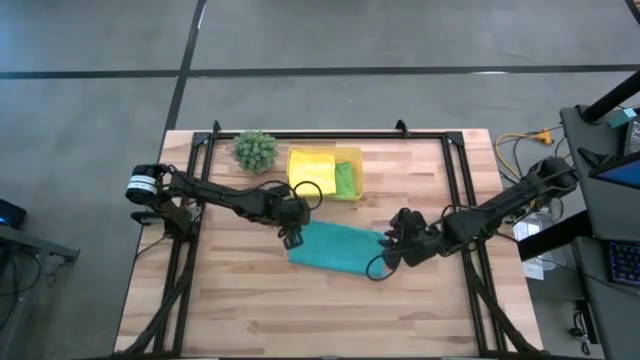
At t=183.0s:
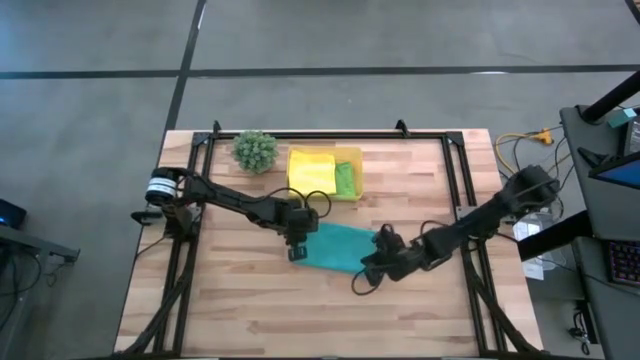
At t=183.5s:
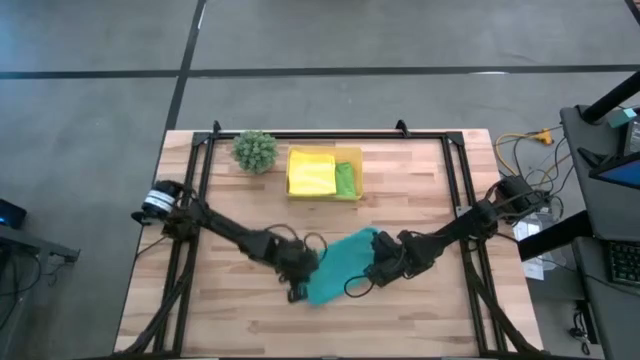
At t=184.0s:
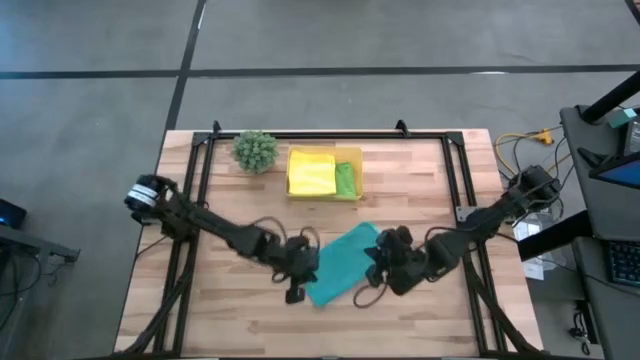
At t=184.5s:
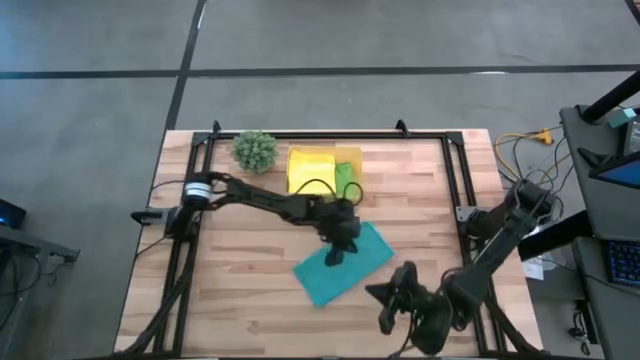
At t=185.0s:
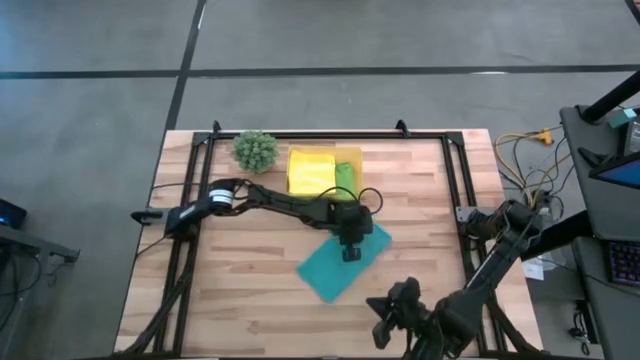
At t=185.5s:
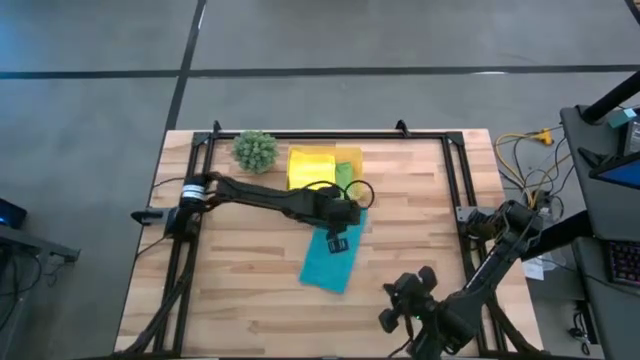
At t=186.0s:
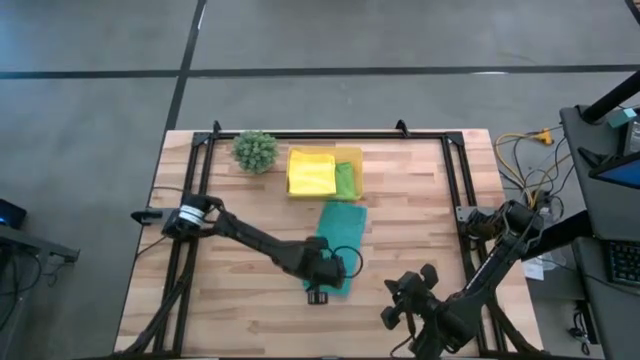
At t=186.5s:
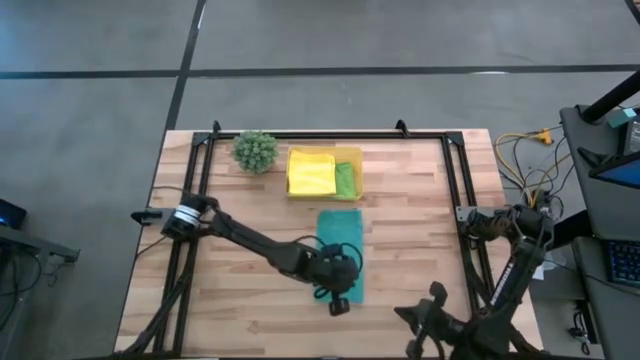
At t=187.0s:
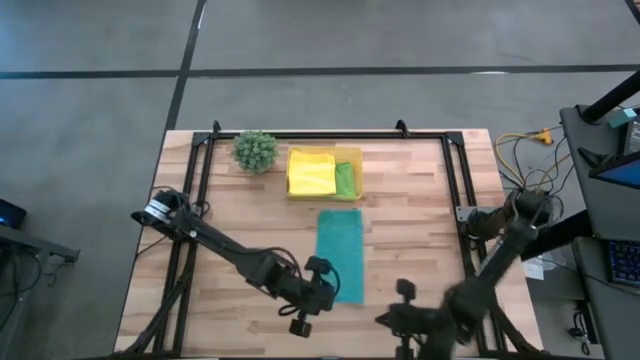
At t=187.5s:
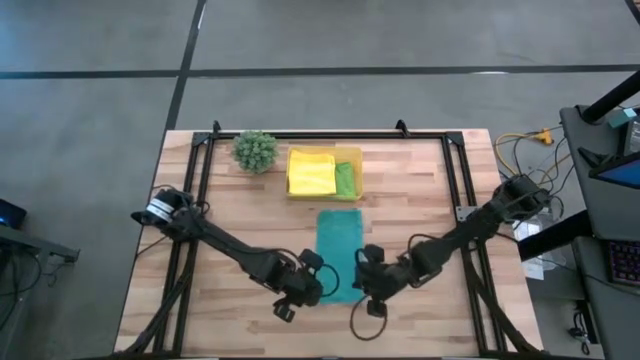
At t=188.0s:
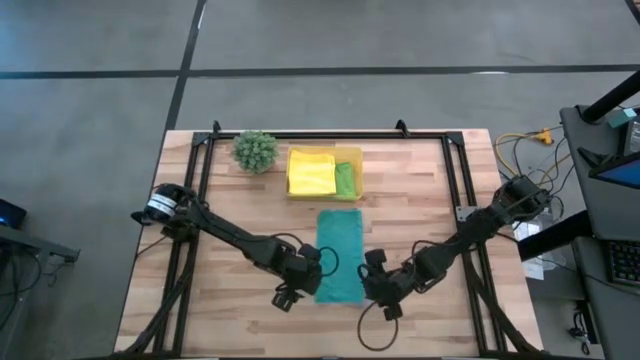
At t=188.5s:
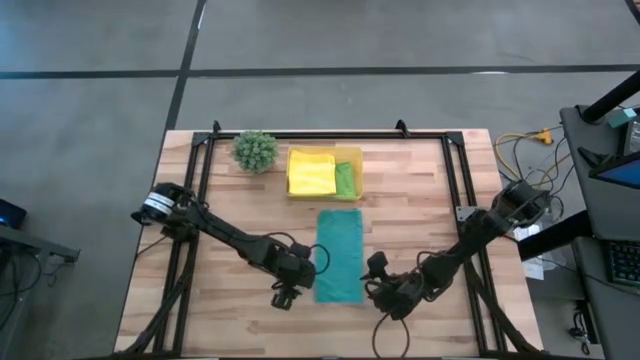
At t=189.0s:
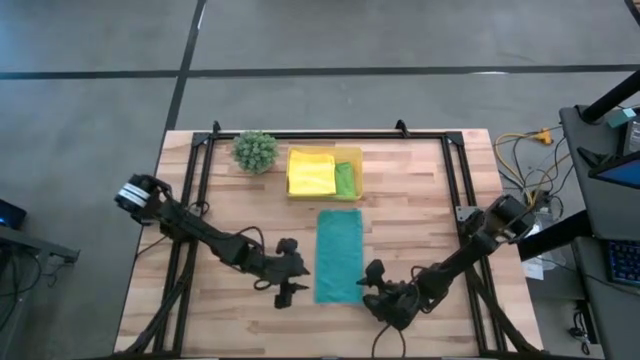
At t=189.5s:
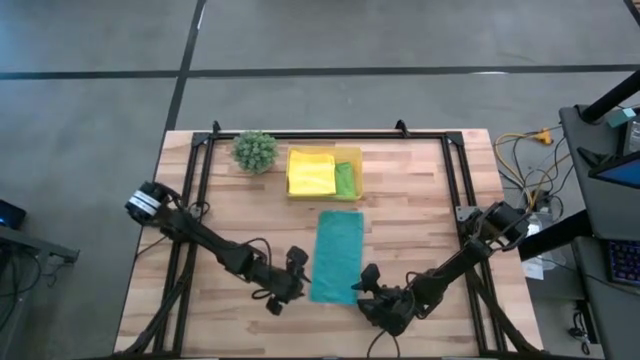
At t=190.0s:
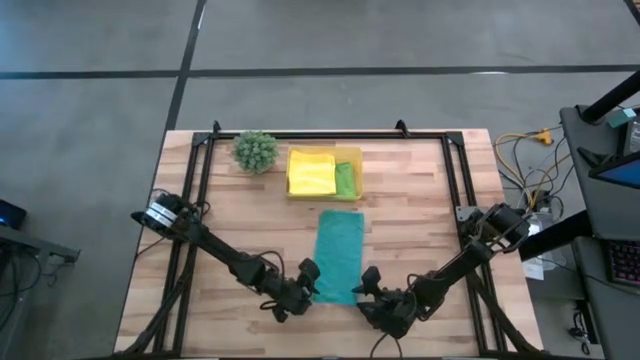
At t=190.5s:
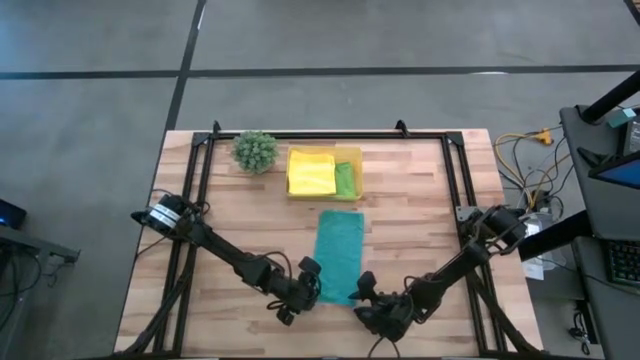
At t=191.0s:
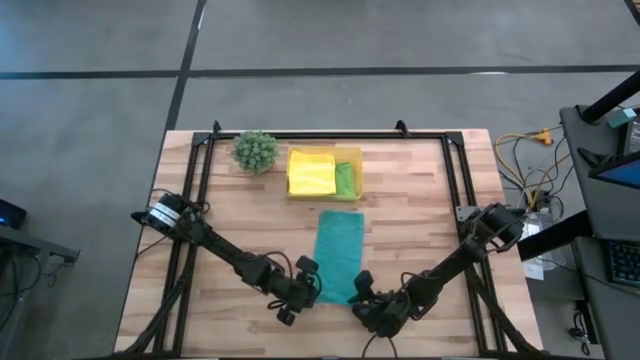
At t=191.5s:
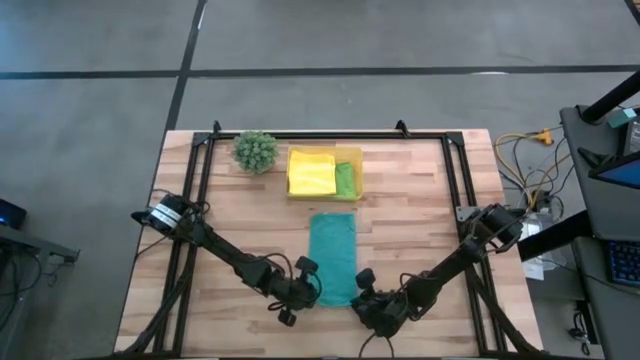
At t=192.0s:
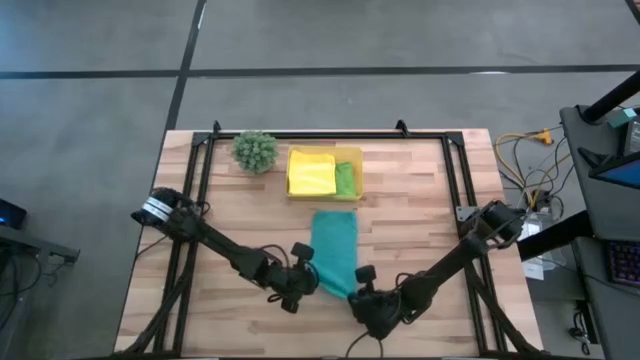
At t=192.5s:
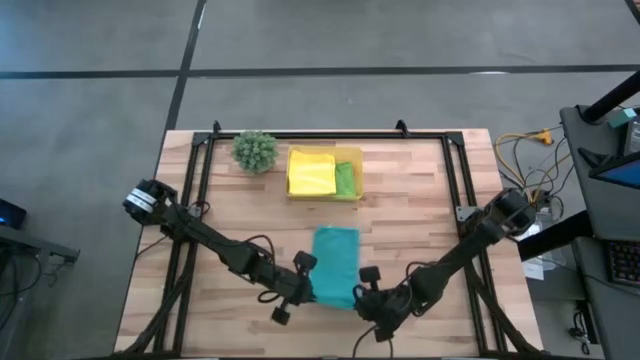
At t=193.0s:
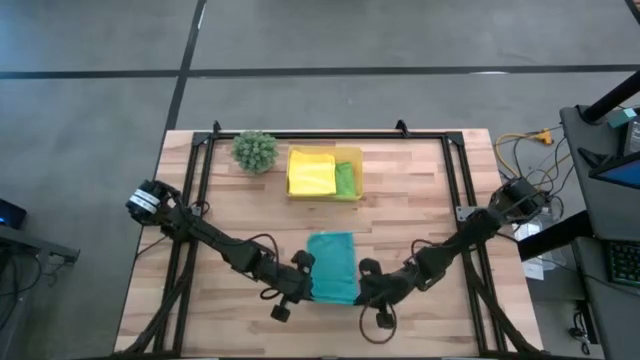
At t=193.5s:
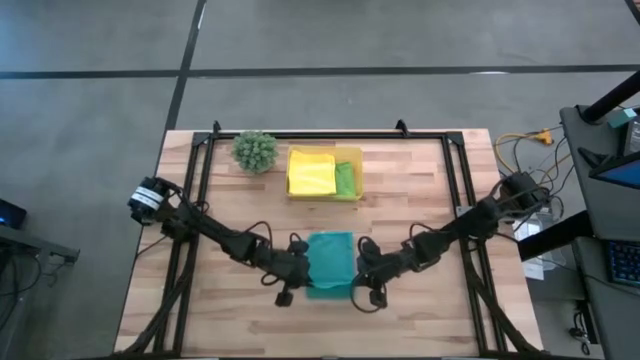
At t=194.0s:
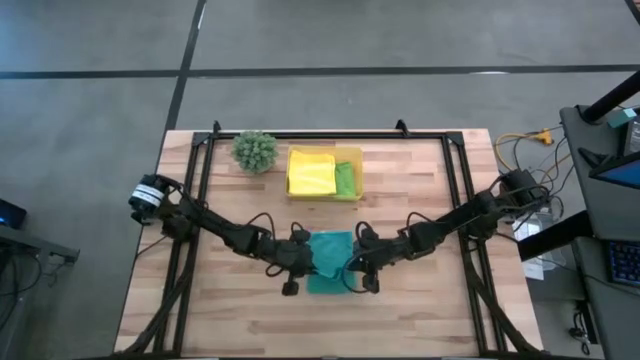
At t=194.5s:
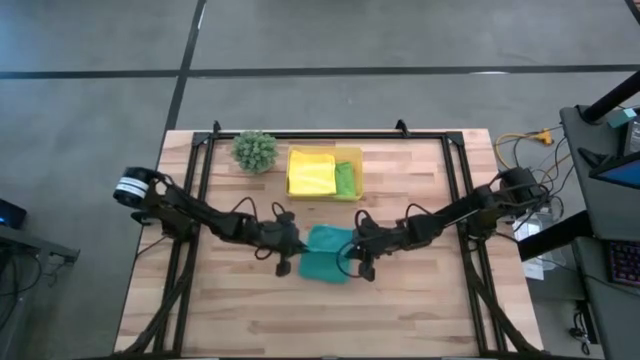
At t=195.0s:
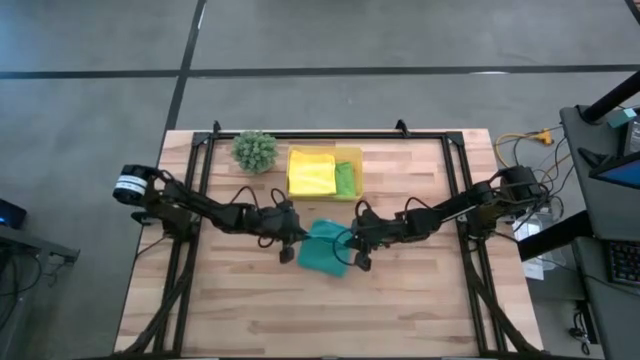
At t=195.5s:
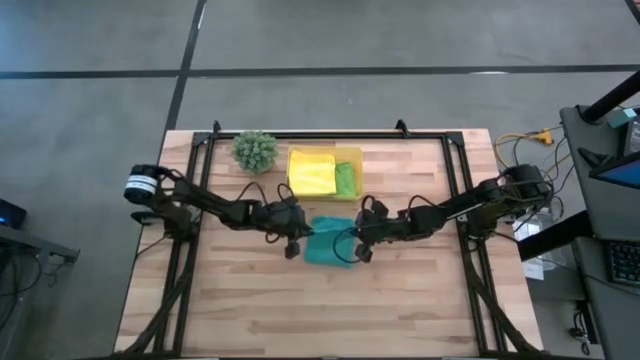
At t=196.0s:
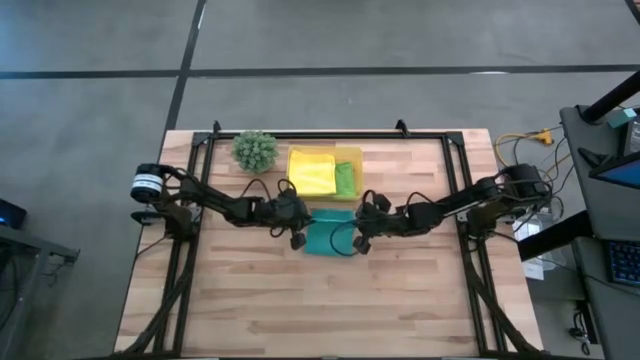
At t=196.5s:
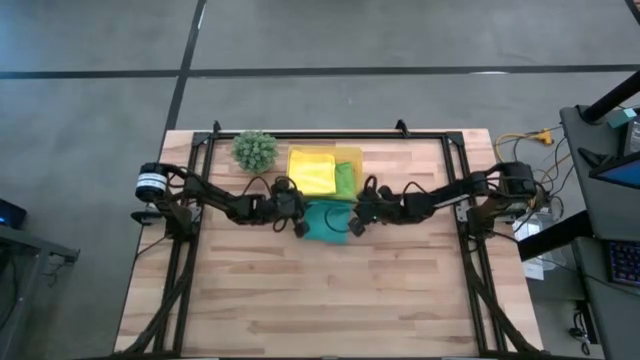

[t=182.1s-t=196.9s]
Task: Fold microfiber towels
Fold the light blue towel

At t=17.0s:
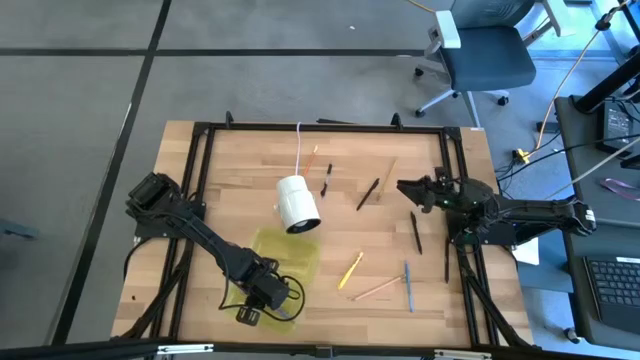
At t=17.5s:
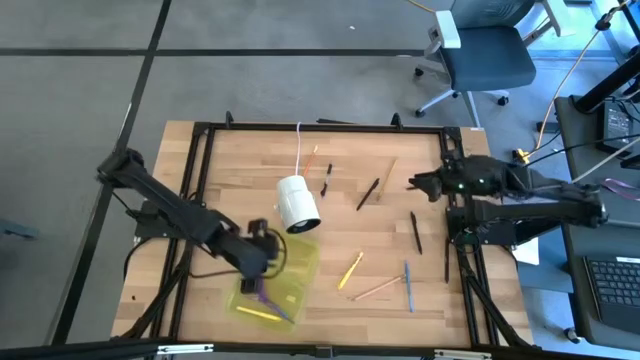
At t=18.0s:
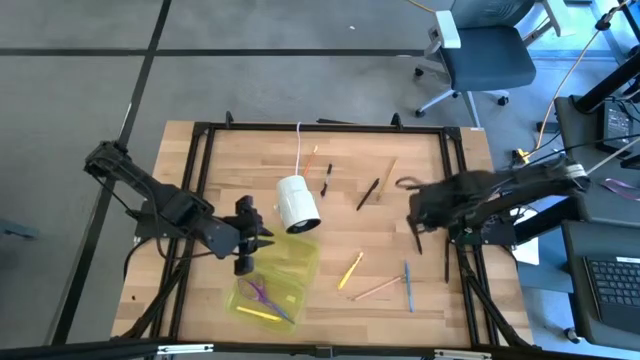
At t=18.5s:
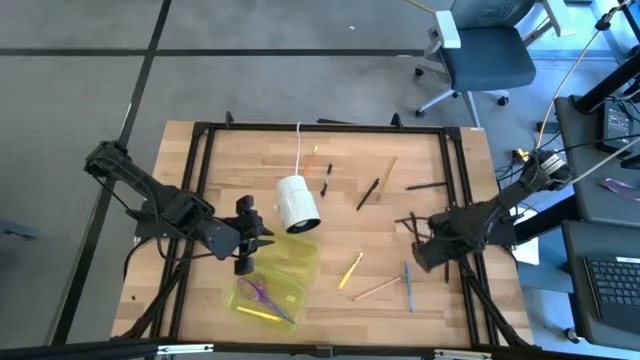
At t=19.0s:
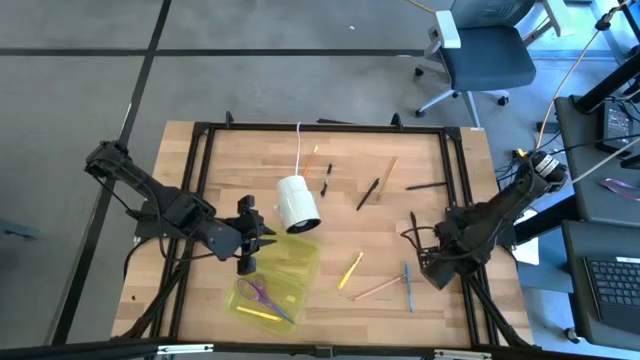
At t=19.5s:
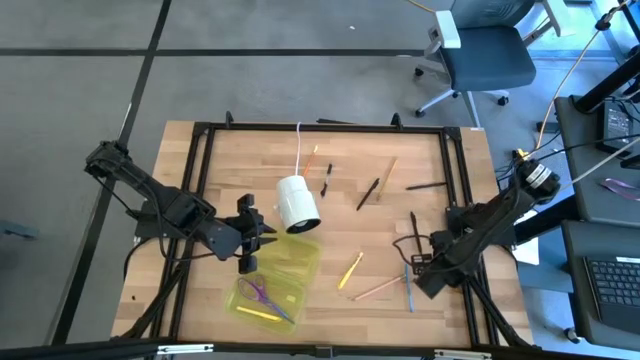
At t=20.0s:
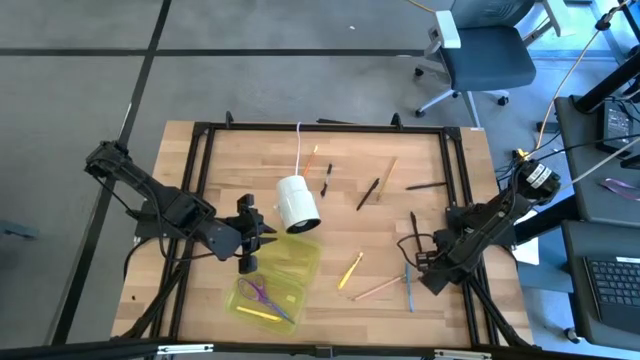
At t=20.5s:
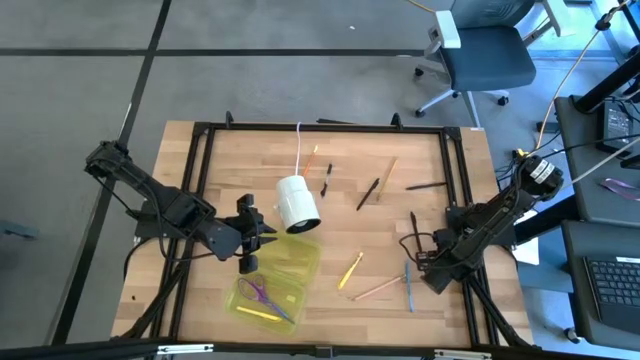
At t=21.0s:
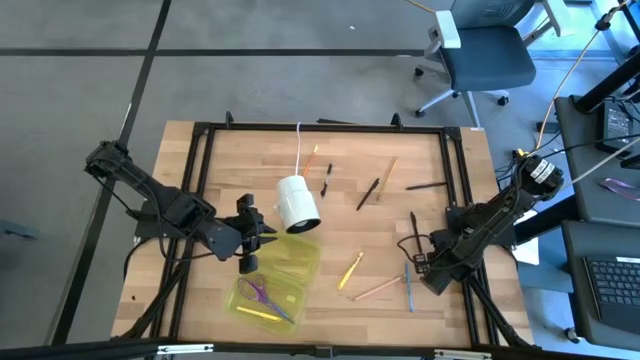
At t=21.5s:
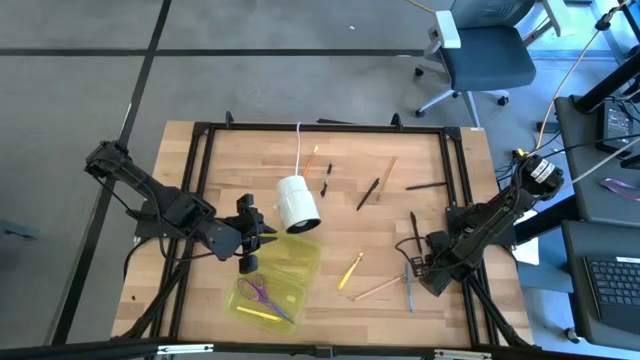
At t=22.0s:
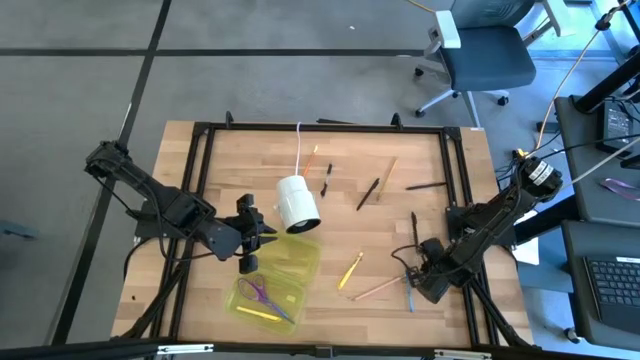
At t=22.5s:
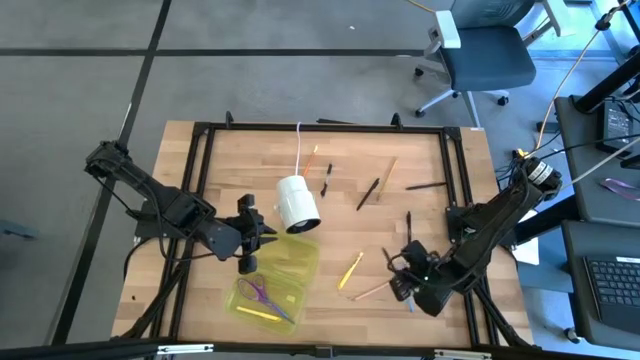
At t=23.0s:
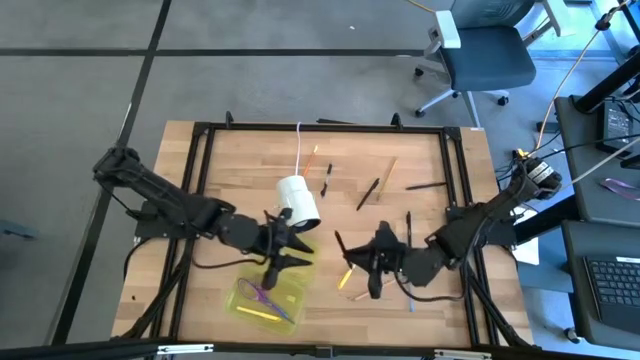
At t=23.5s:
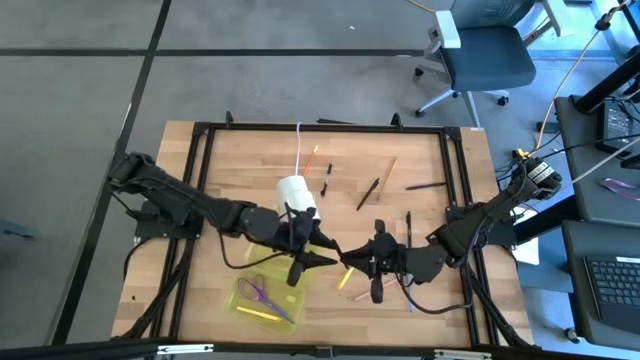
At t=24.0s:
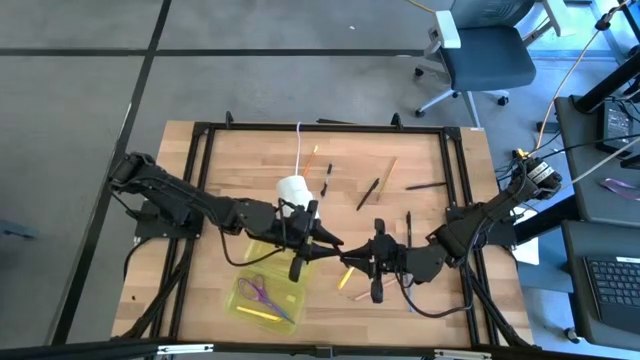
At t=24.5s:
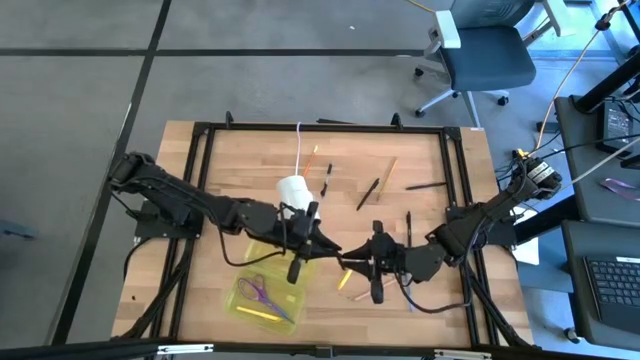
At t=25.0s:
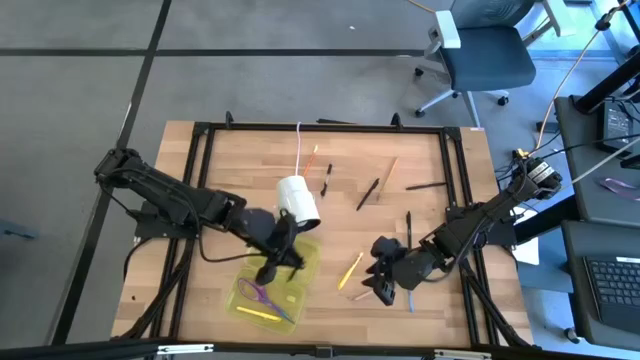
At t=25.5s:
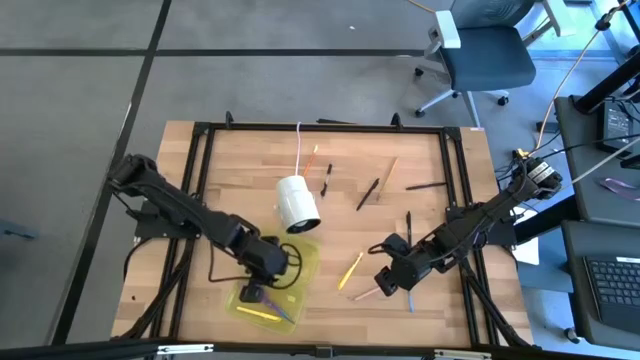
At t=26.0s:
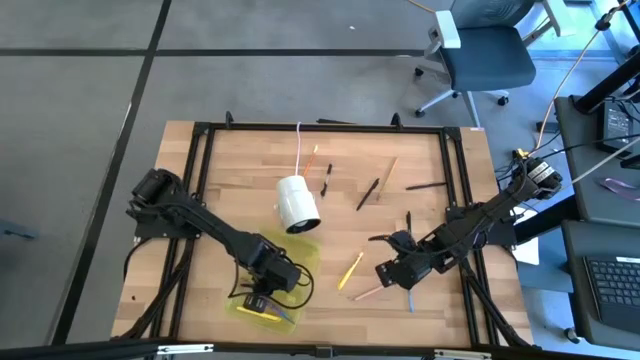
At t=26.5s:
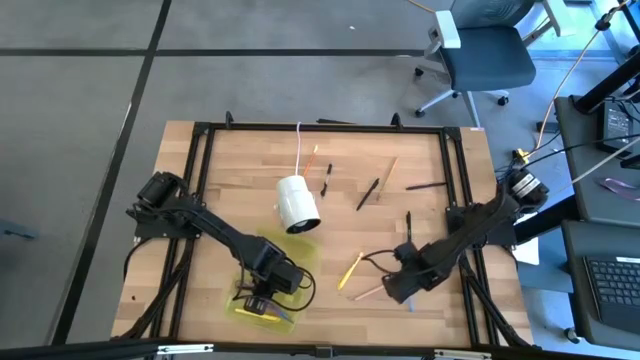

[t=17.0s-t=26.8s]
Task: Pick & place school supplies into a supply box
Put the black pen into the supply box
